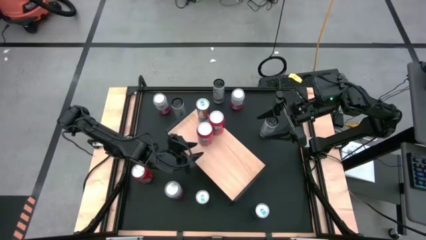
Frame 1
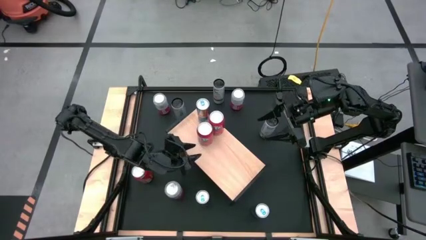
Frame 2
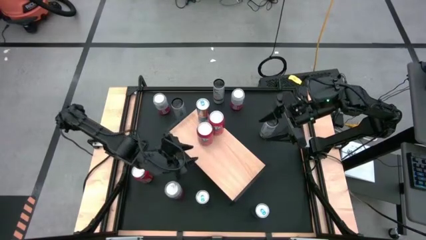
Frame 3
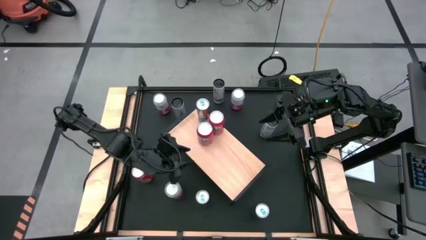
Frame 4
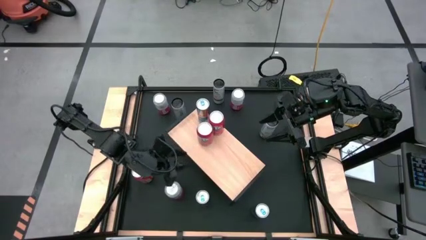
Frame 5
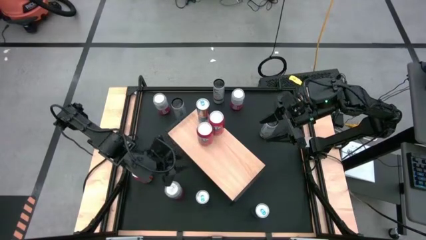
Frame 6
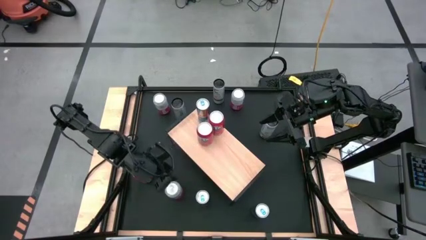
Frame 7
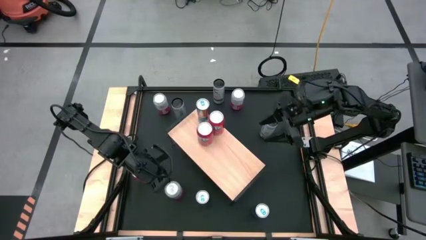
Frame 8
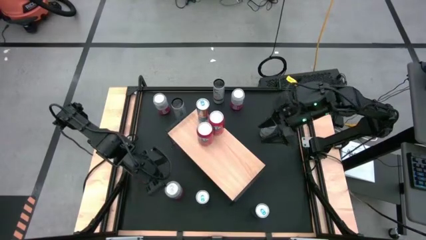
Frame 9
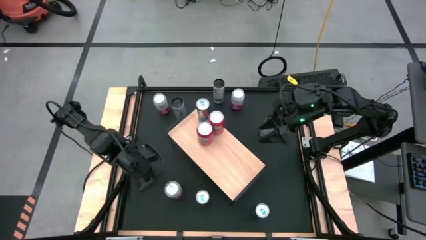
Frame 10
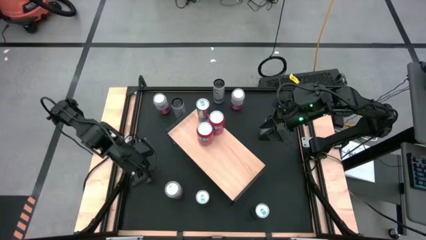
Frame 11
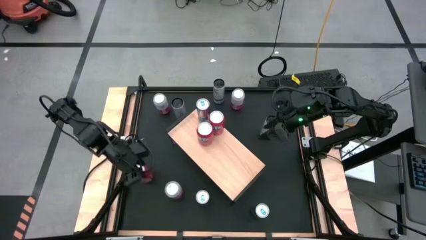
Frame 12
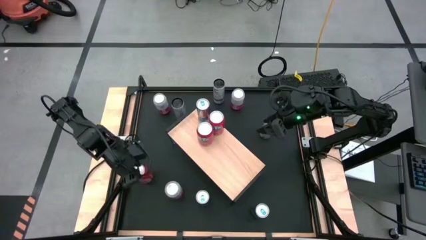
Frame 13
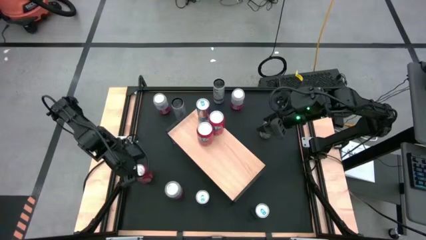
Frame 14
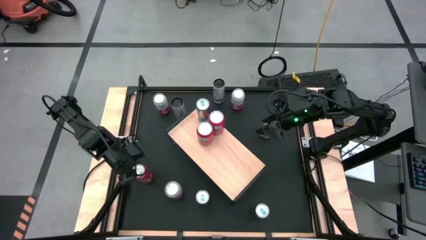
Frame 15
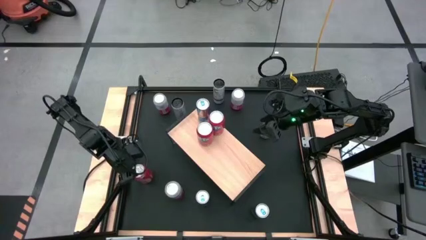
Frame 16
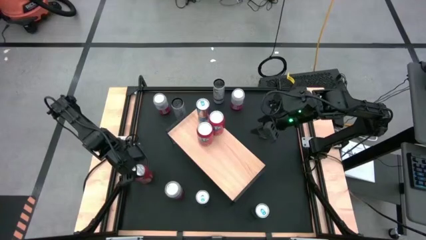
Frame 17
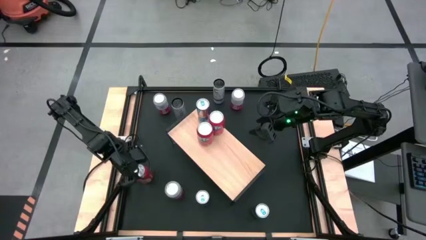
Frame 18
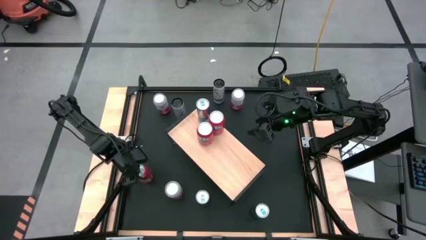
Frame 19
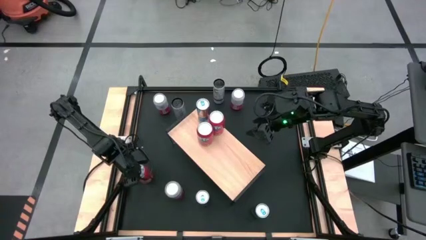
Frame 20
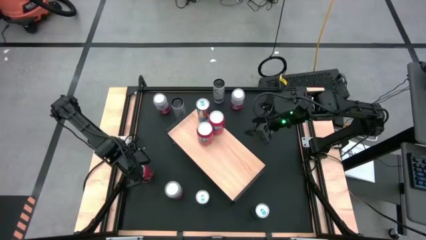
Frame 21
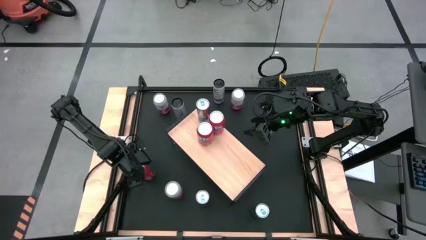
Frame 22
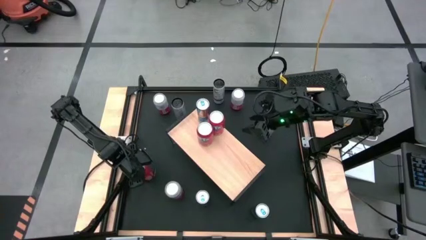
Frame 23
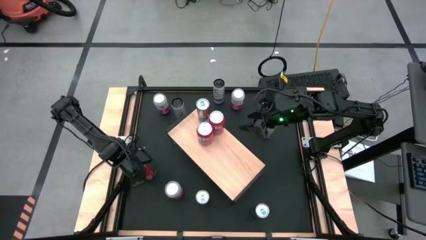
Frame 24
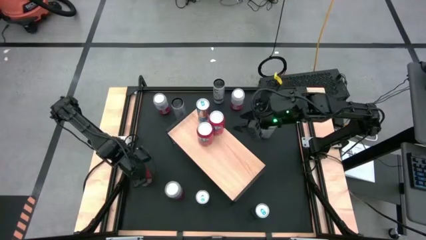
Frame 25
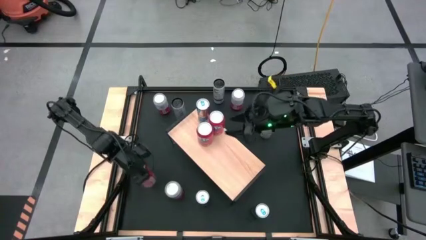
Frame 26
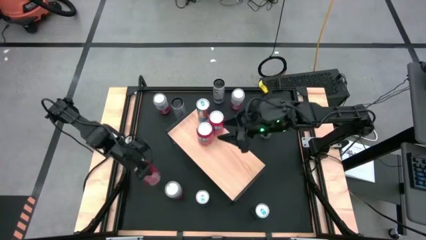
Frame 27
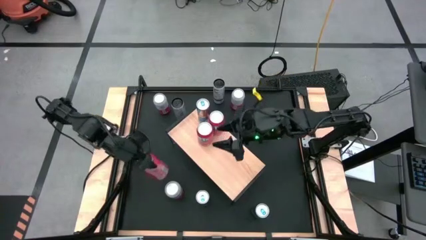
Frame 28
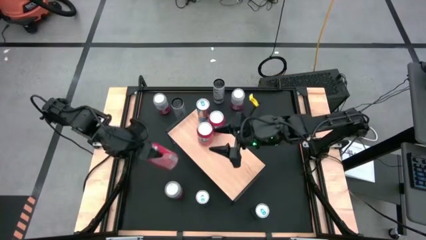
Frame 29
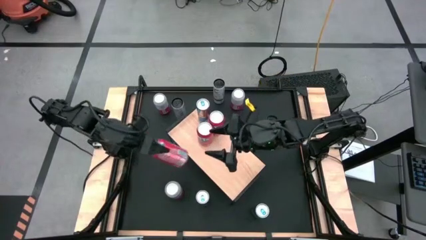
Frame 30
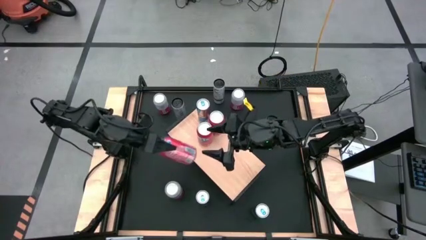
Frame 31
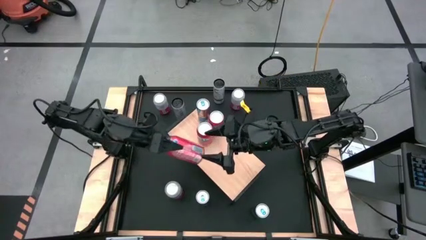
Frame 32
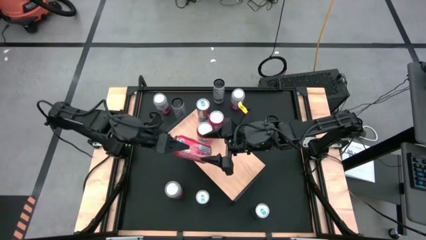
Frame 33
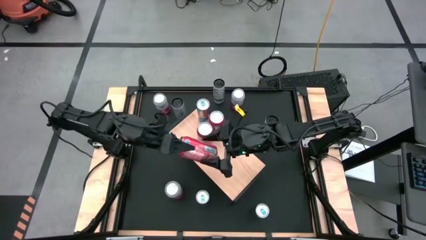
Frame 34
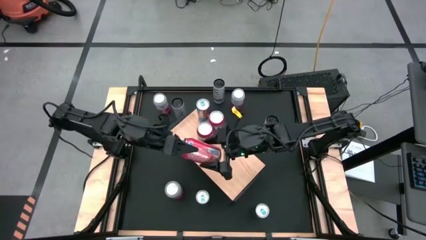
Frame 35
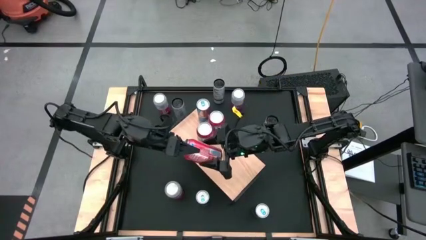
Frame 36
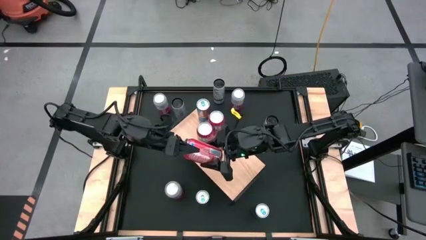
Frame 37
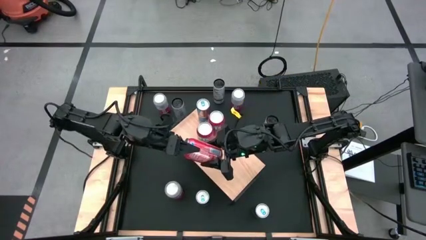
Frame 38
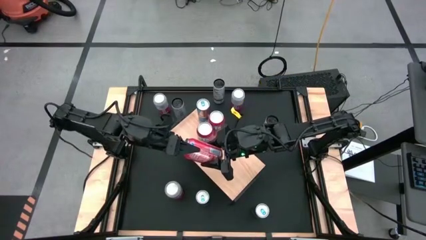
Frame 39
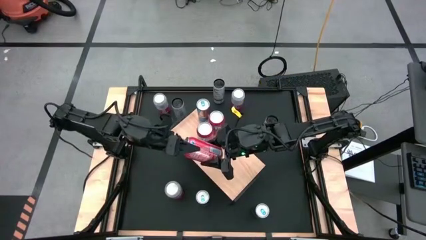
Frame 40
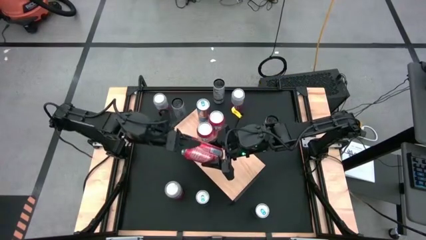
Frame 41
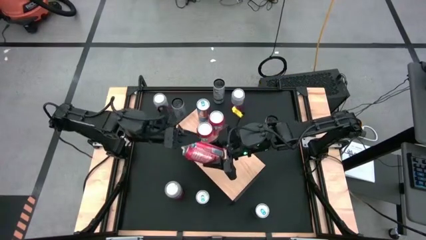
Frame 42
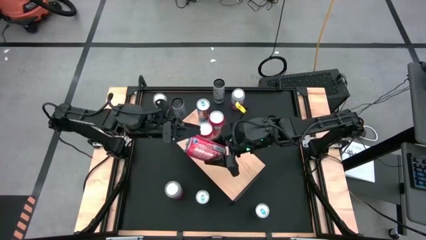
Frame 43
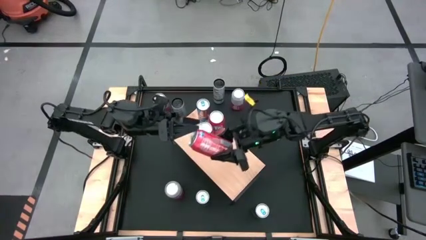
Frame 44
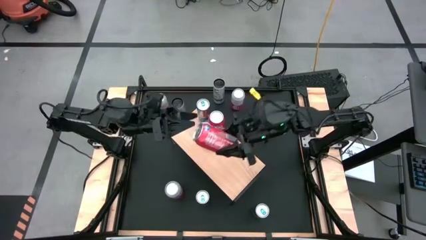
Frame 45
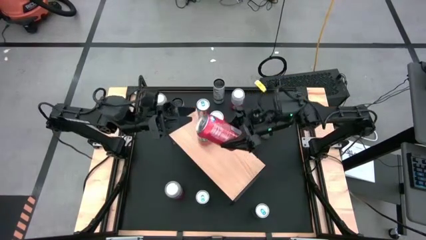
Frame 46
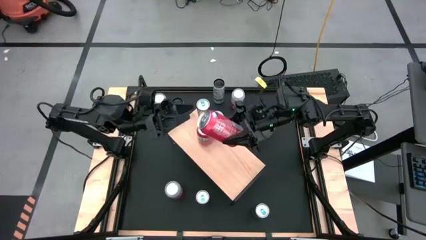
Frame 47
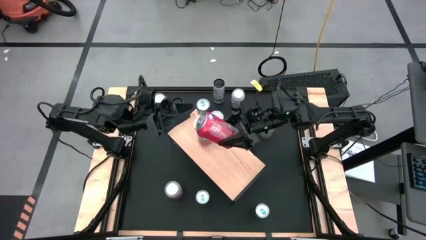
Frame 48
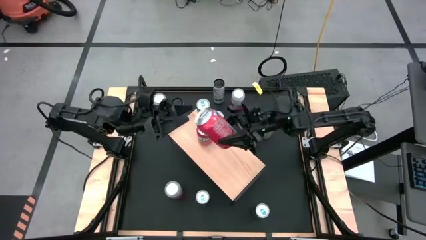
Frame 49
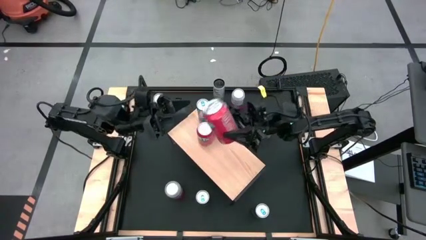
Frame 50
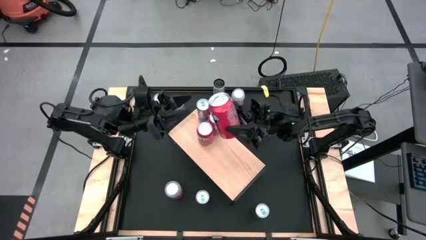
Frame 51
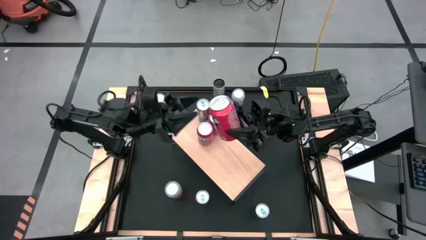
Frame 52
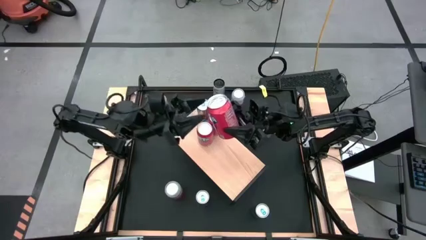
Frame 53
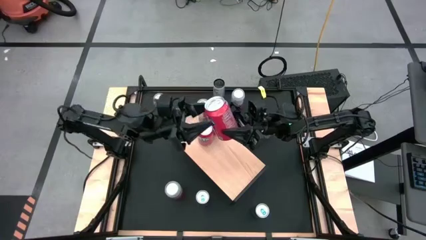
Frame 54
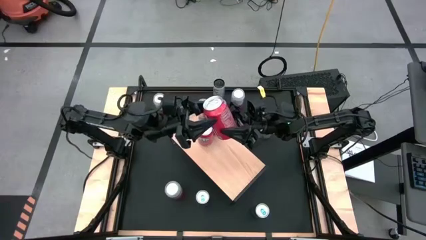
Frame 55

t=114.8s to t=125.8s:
Task: Place canned beverage on shelf
Put the red soda can on the shelf aligned with the other red soda cans

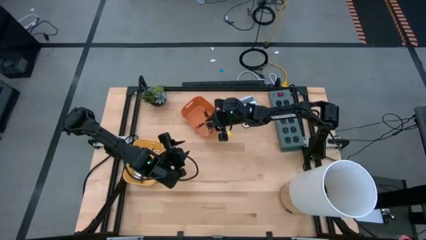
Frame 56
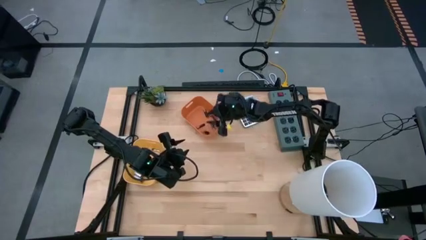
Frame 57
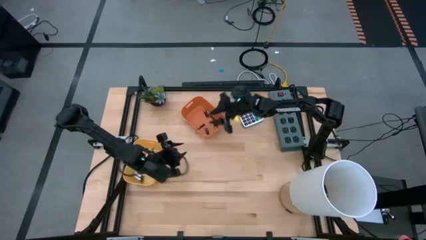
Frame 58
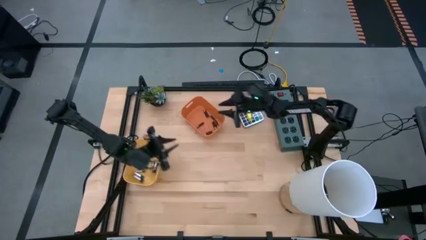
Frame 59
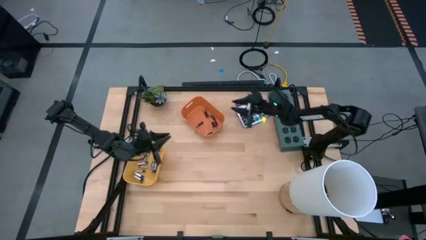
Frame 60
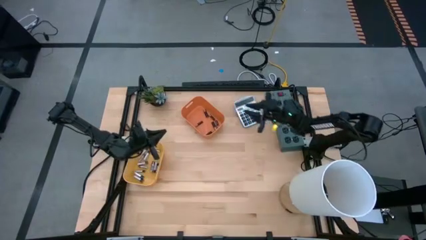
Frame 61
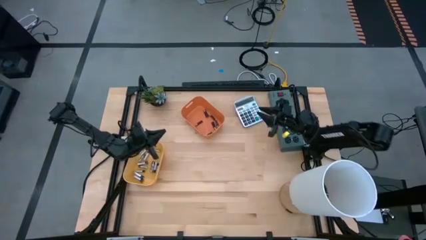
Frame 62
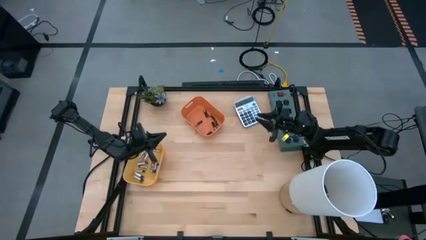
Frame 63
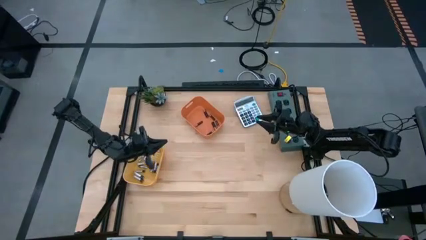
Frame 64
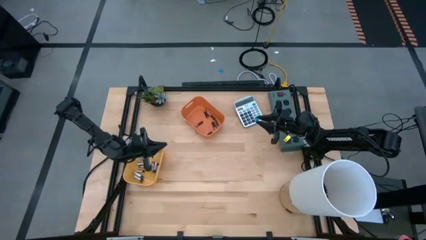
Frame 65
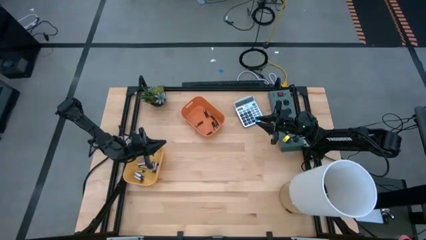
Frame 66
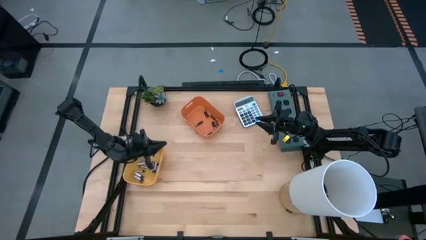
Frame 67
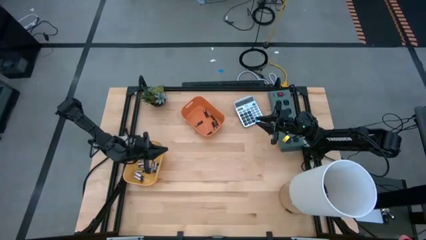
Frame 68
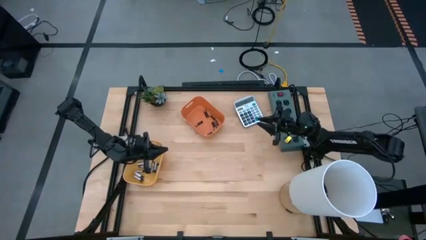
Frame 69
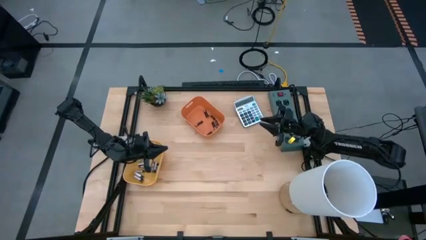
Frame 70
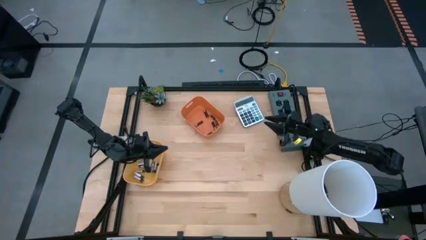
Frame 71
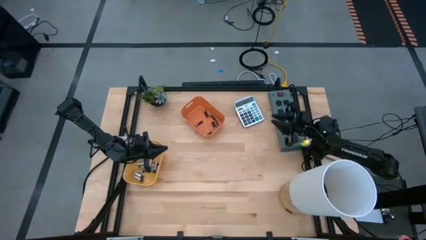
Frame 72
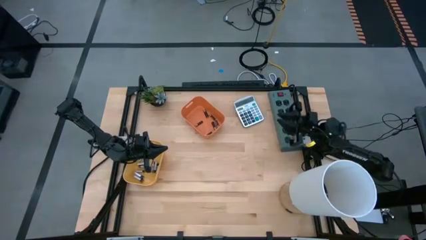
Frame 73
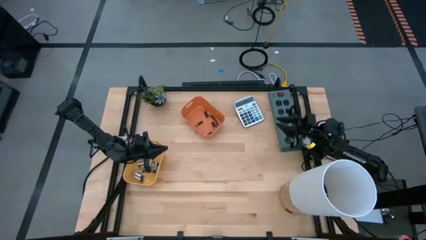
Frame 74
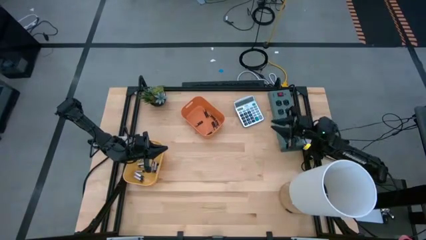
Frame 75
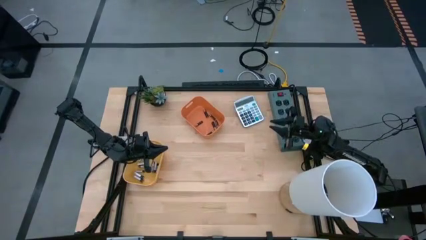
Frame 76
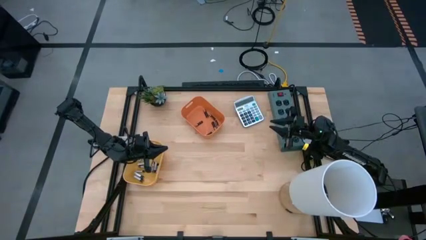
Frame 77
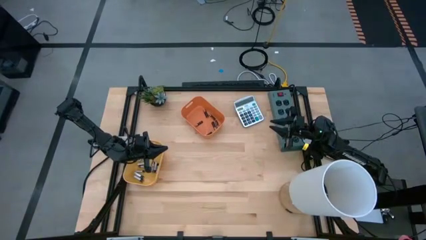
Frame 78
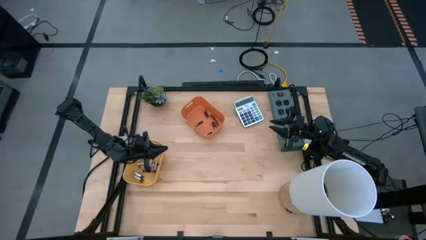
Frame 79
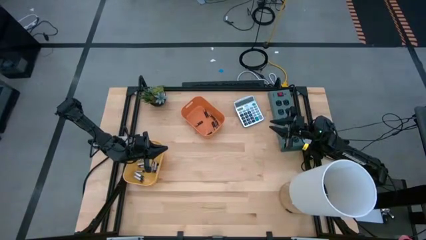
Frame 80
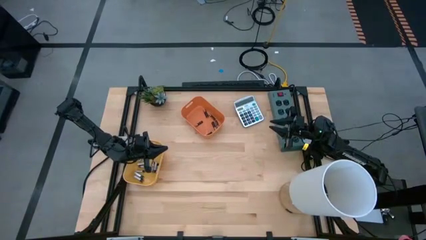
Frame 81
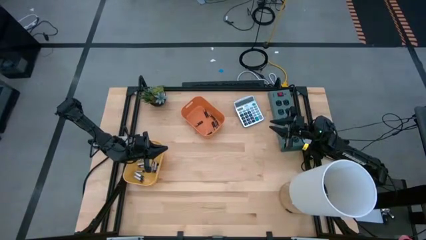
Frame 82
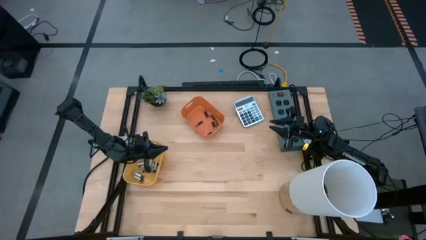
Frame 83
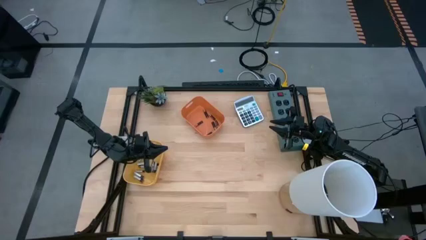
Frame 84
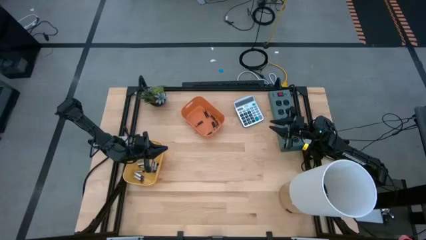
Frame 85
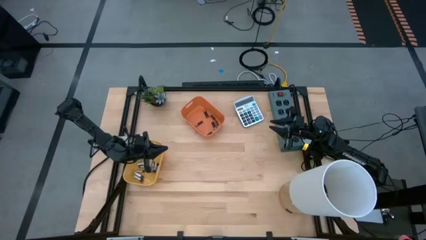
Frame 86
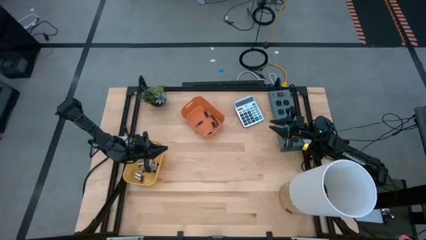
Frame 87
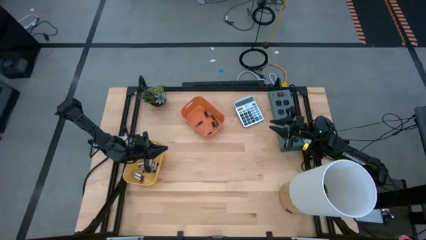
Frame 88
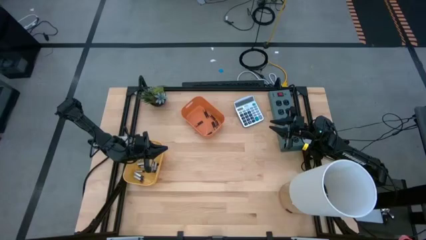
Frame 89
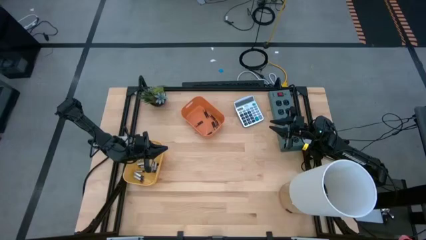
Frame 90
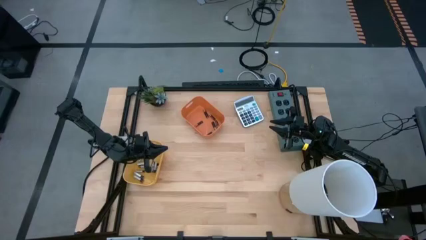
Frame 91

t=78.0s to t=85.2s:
Task: Sort batteries
Return to Home Position
